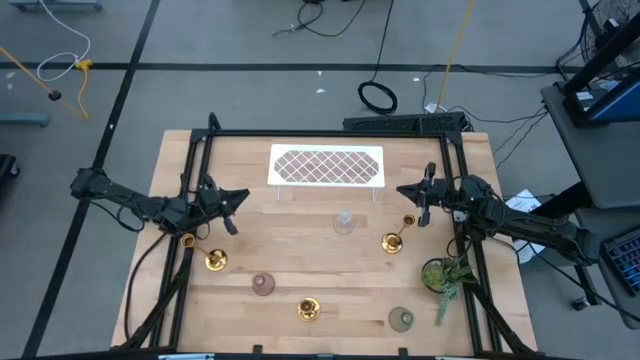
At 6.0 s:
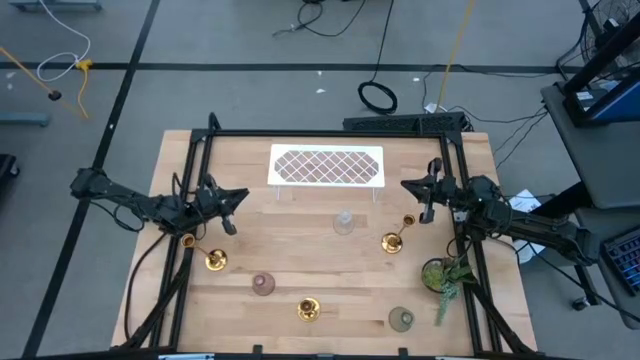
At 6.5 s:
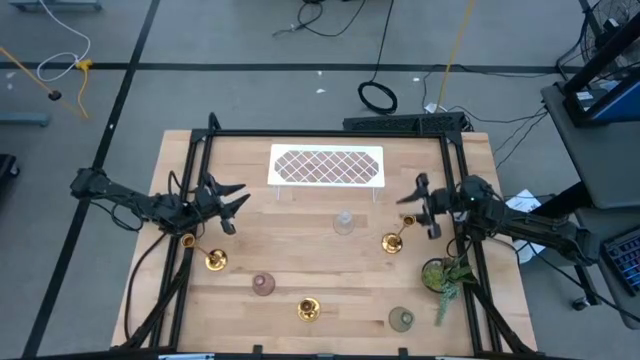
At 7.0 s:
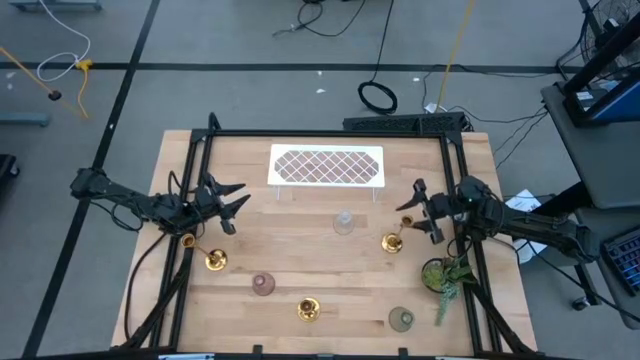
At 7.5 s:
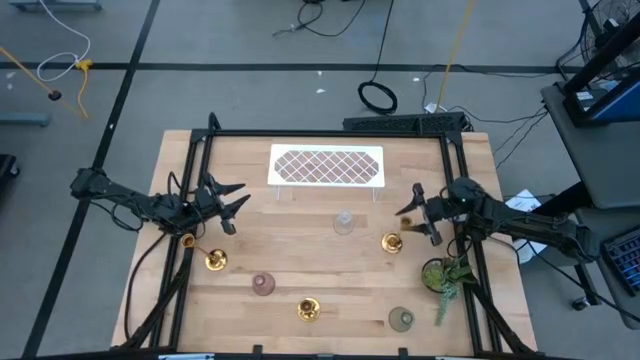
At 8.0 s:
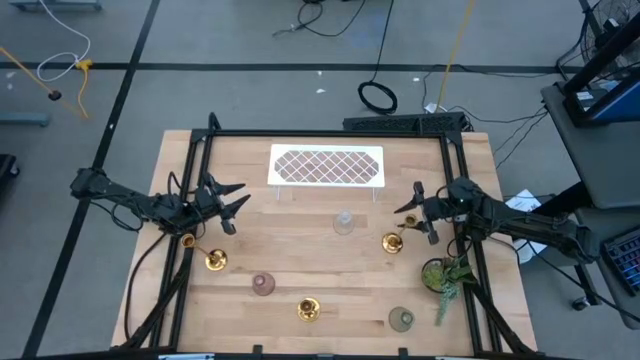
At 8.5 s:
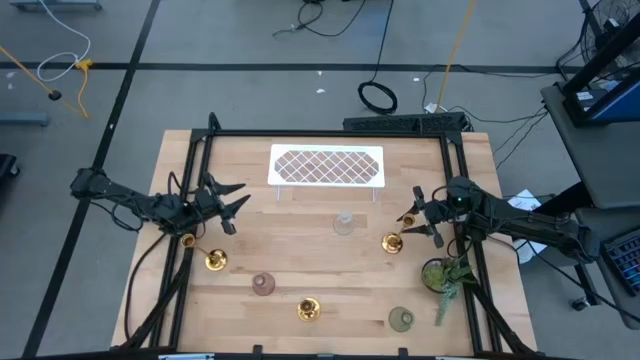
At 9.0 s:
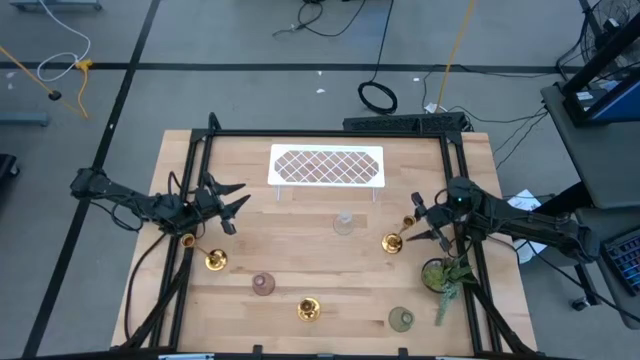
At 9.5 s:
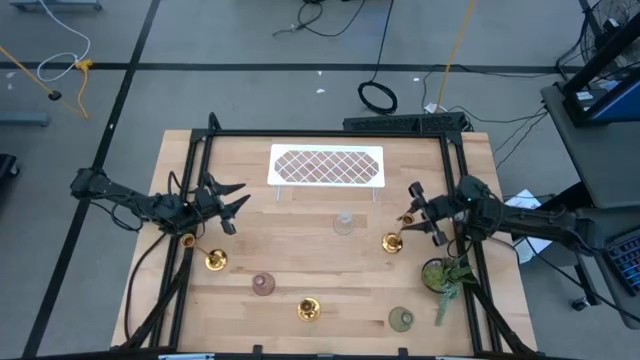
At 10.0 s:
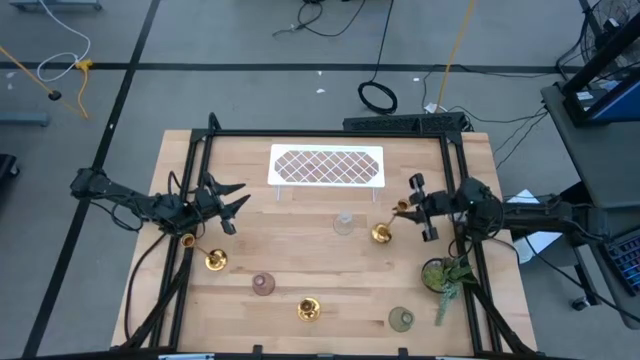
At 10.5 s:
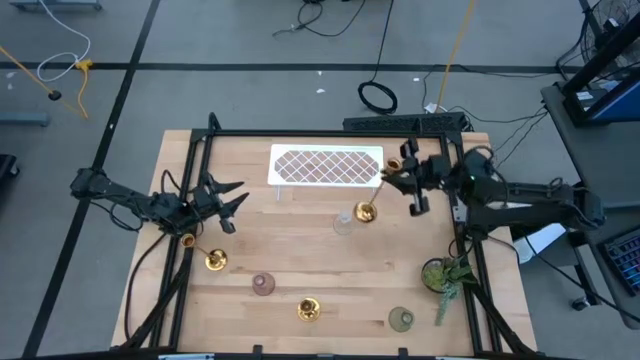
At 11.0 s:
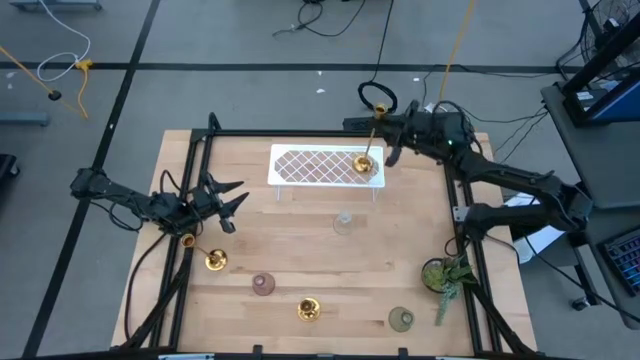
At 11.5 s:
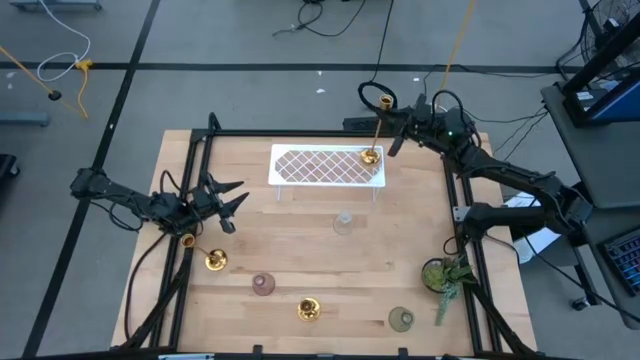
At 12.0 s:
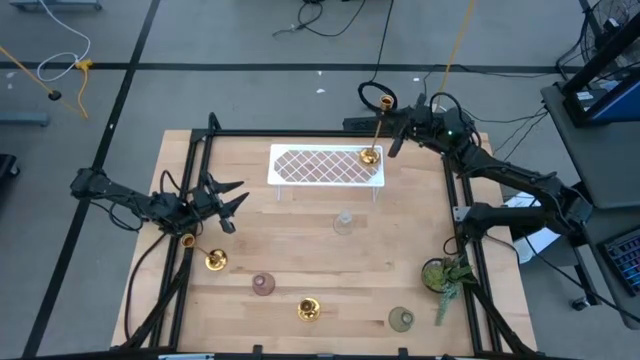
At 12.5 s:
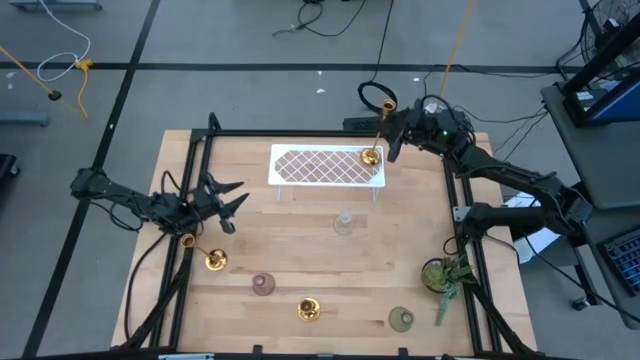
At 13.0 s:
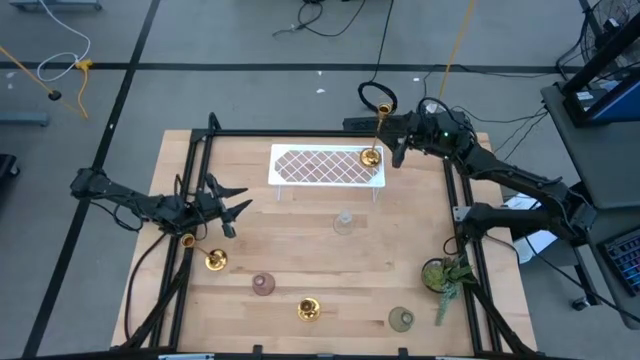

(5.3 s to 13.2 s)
Task: Pick & Place candle stick holders
Put the right golden candle holder on the shelf

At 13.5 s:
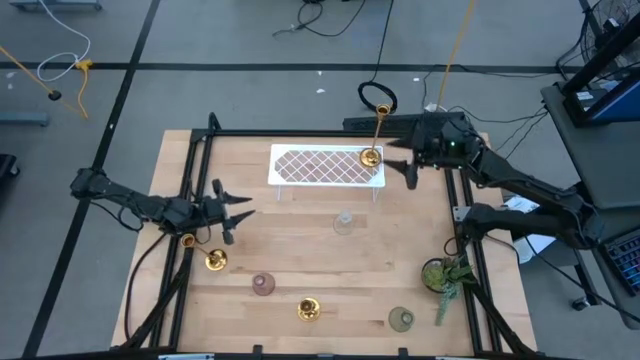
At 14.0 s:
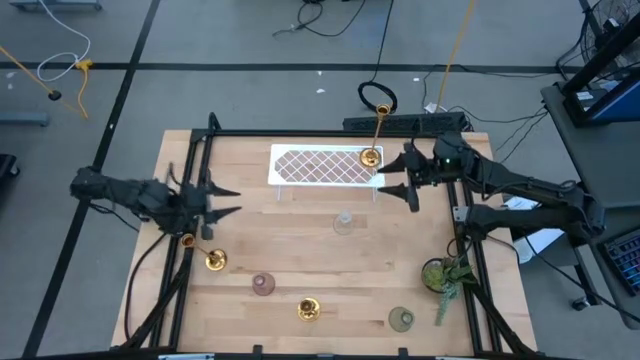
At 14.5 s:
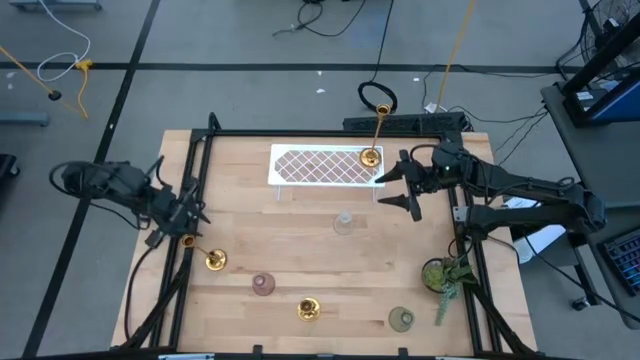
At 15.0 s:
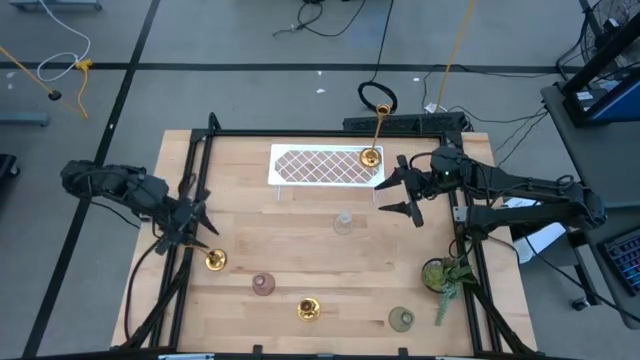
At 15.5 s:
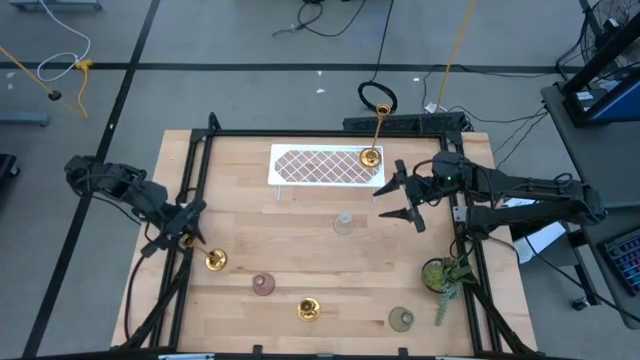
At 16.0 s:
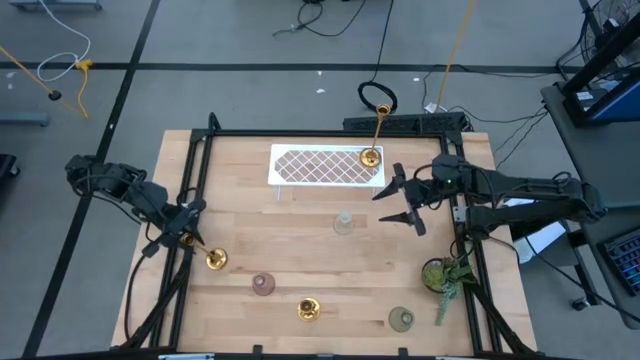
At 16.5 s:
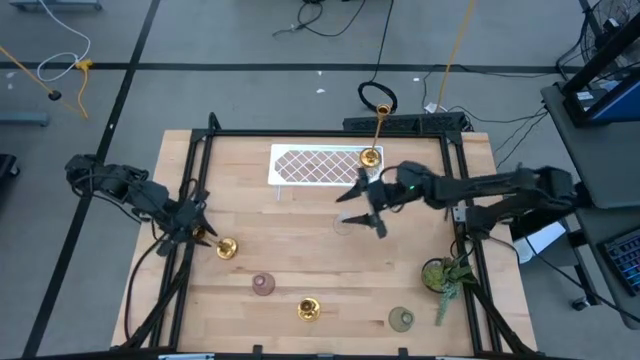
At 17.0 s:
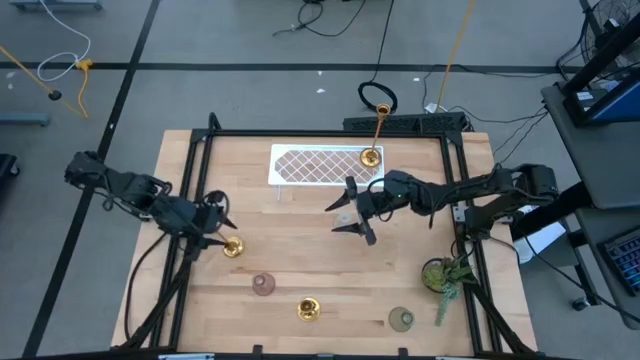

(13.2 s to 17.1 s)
Put the top golden candle holder on the shelf

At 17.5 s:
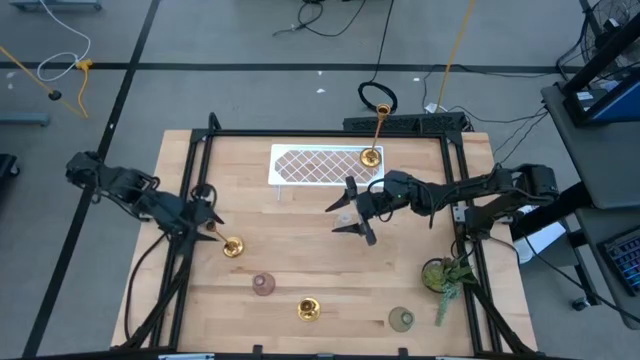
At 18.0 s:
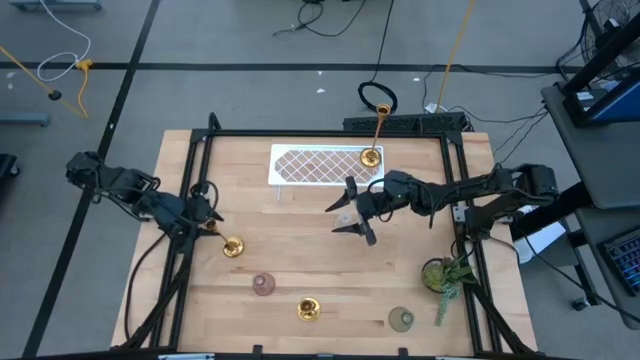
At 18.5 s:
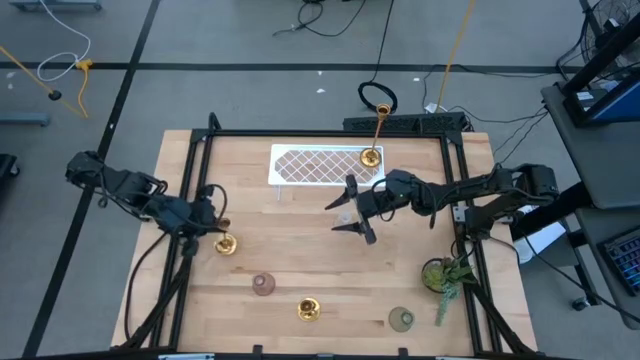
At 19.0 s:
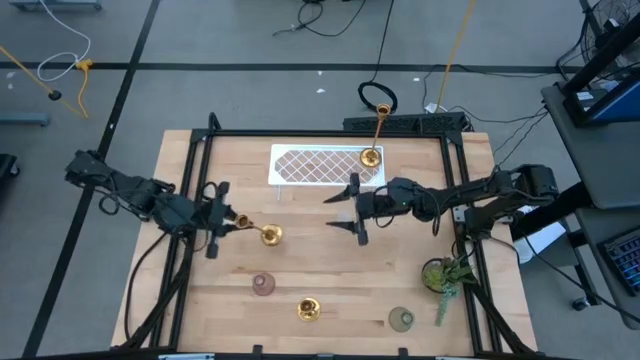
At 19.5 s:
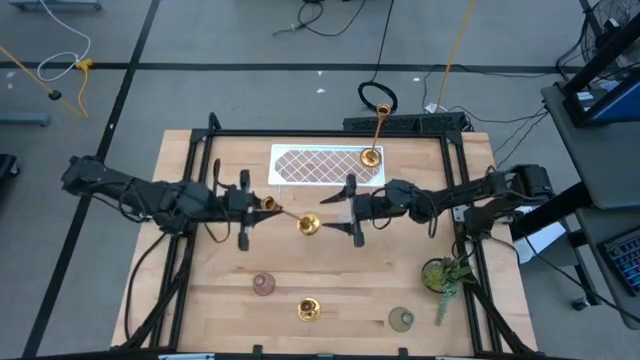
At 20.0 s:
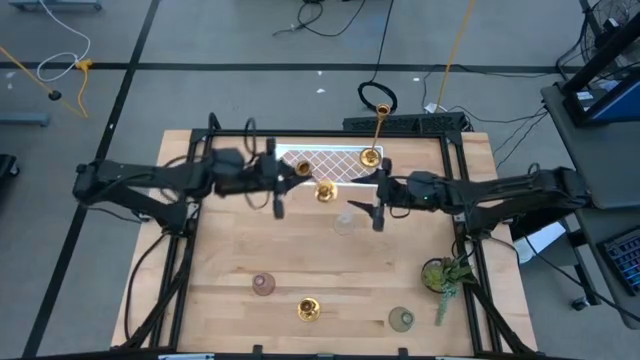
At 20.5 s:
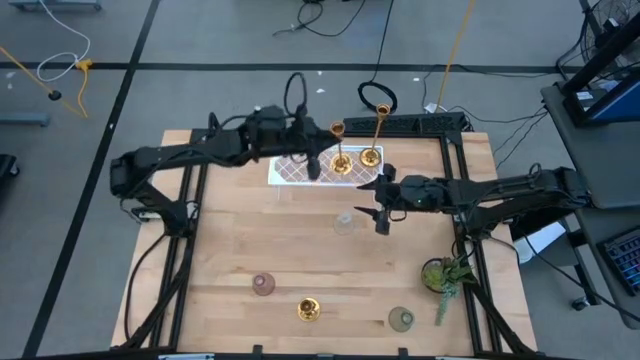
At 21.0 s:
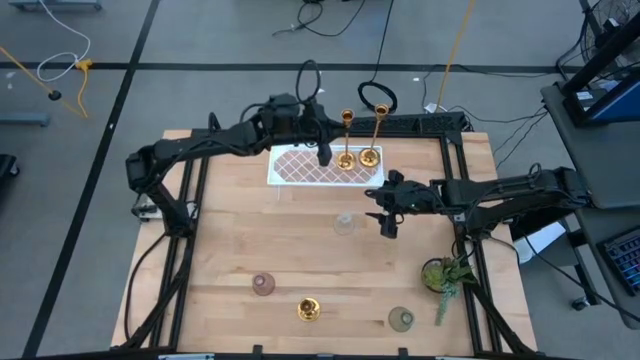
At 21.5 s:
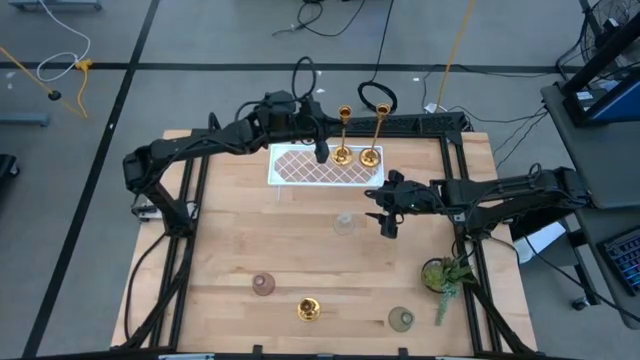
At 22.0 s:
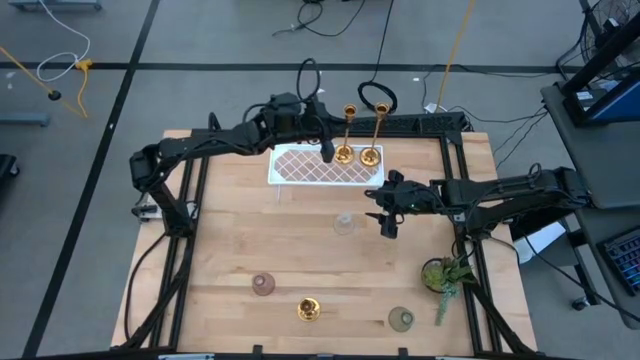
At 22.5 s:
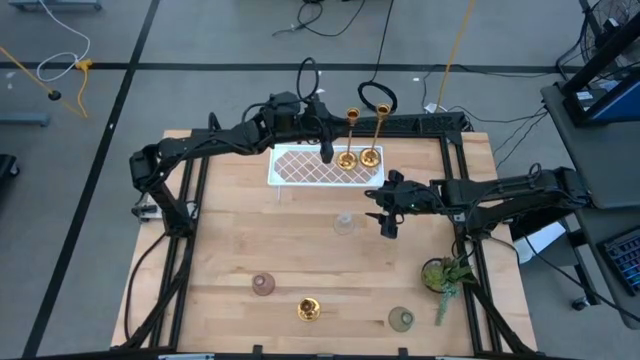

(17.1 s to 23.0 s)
Put the top golden candle holder on the shelf

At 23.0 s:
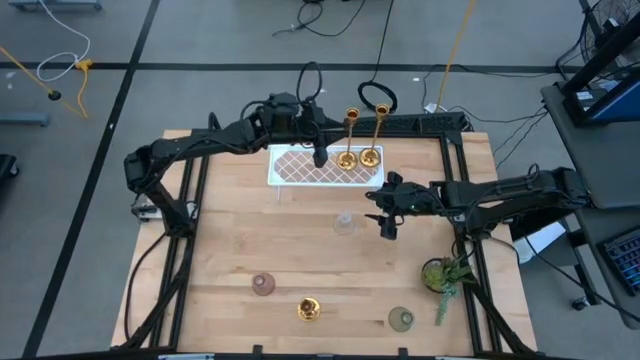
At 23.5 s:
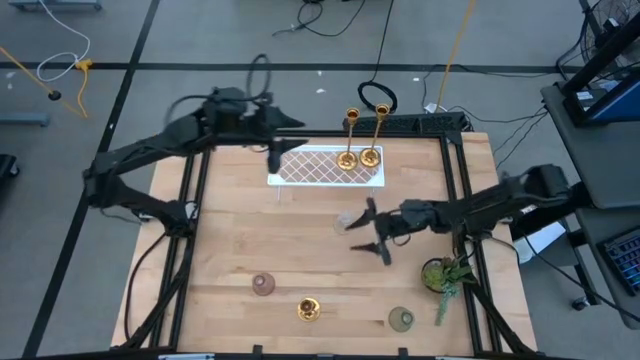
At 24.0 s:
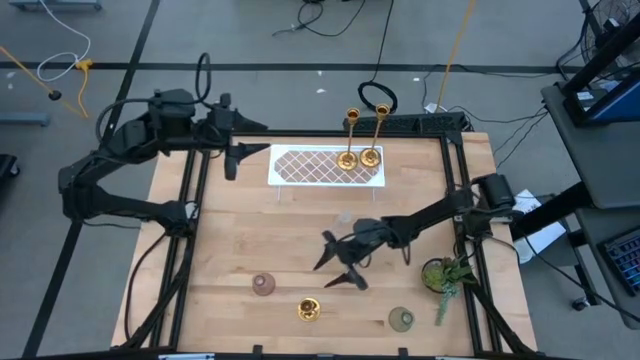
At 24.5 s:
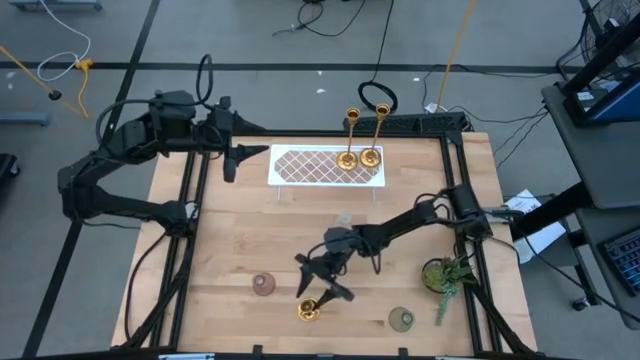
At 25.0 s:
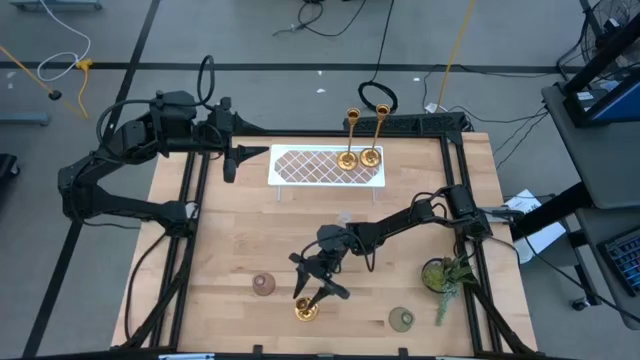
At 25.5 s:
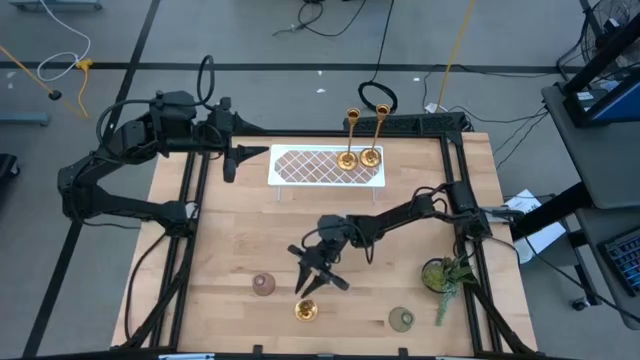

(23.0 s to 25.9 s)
Put the golden candle holder on the shelf

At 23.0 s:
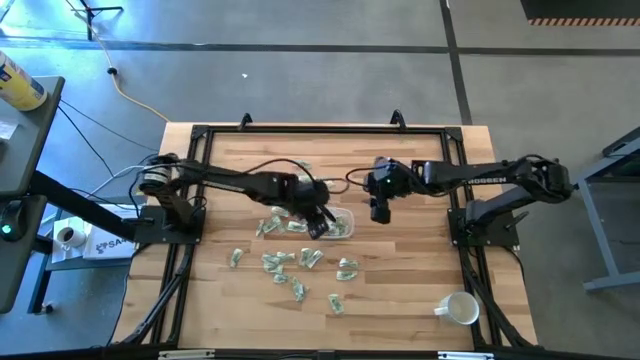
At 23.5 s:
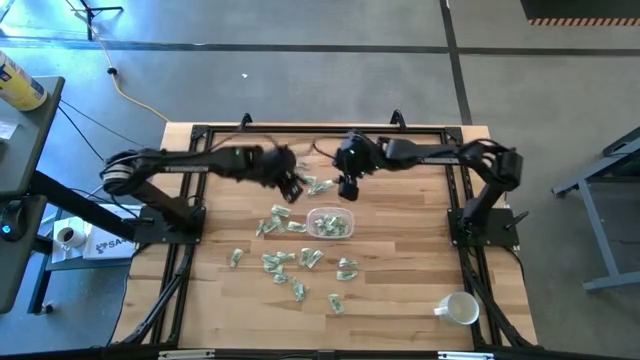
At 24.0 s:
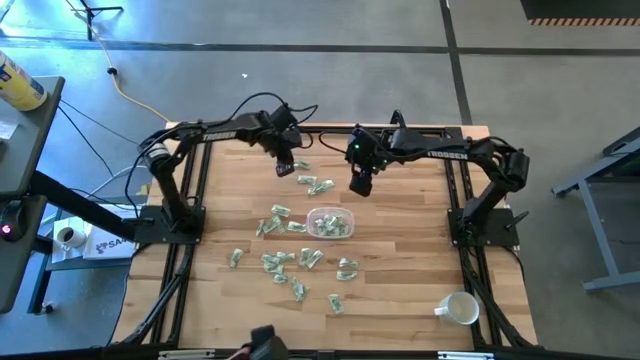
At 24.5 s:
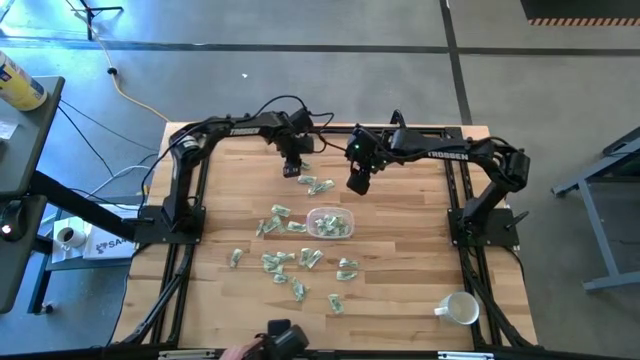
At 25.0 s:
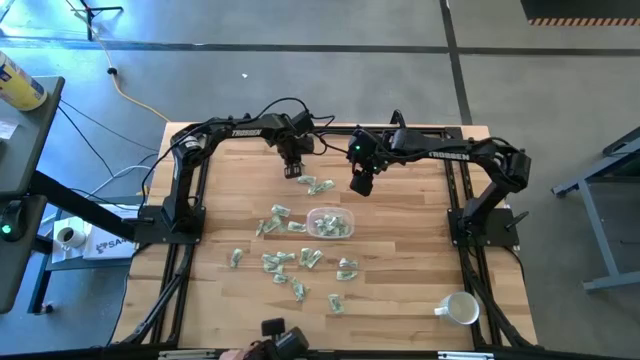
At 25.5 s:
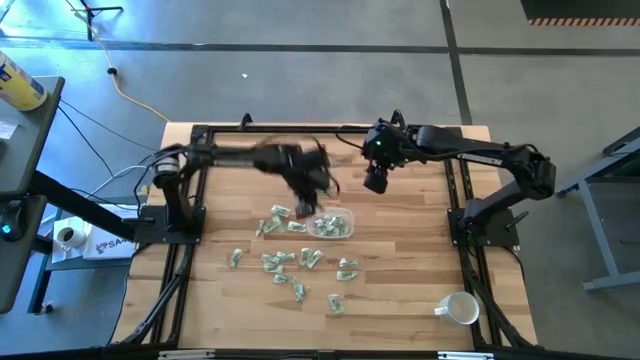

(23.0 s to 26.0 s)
Task: Pick and place Stevia / Truvia into bins
Put the stevia packet into the transparent container
